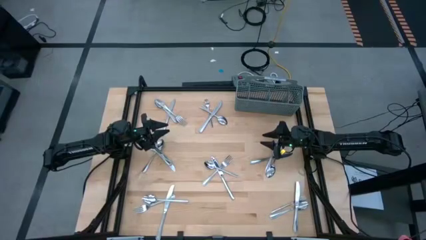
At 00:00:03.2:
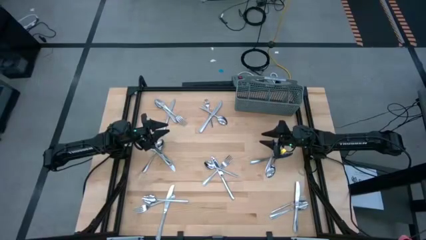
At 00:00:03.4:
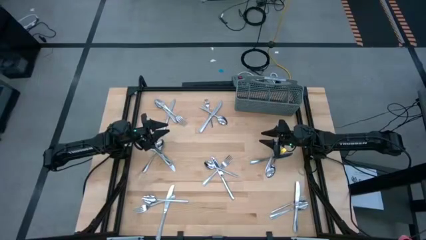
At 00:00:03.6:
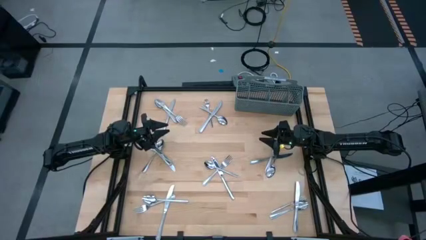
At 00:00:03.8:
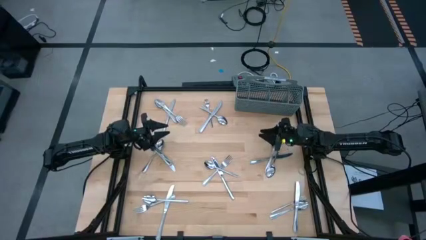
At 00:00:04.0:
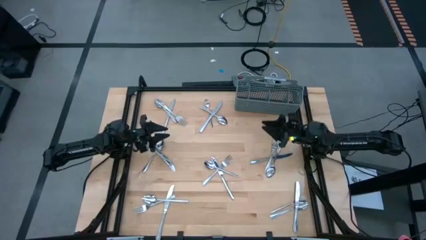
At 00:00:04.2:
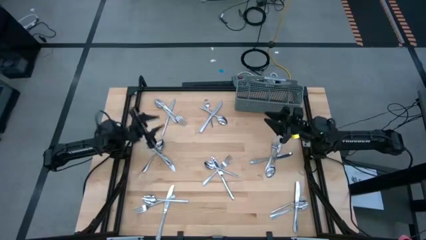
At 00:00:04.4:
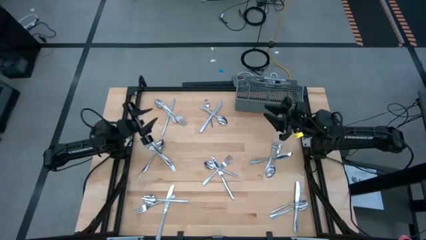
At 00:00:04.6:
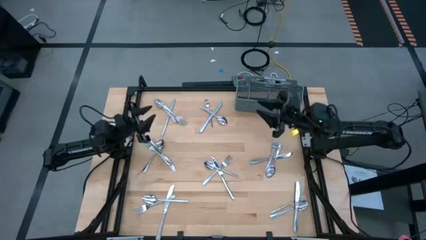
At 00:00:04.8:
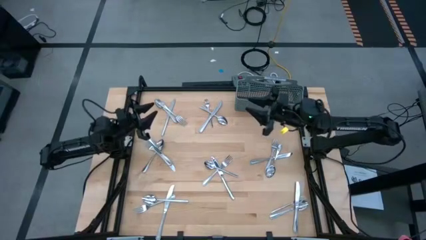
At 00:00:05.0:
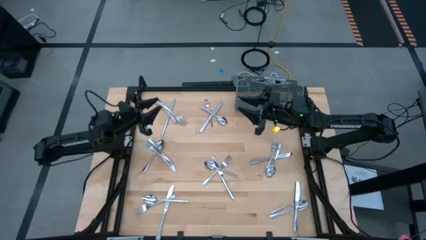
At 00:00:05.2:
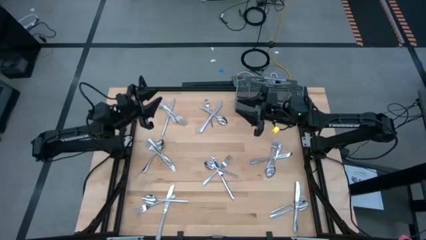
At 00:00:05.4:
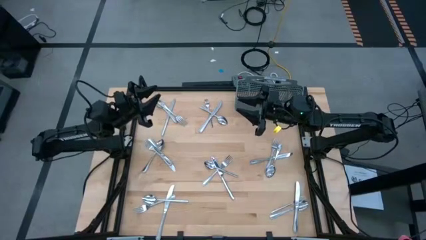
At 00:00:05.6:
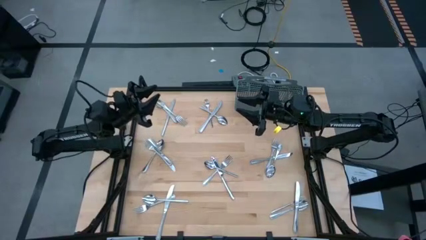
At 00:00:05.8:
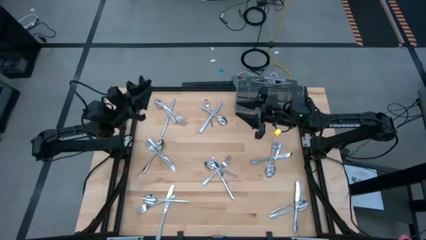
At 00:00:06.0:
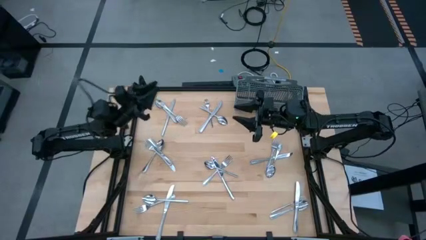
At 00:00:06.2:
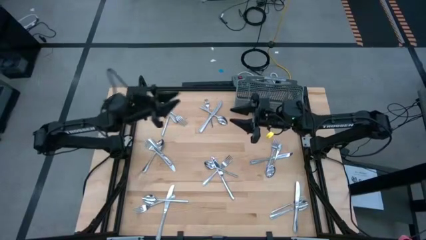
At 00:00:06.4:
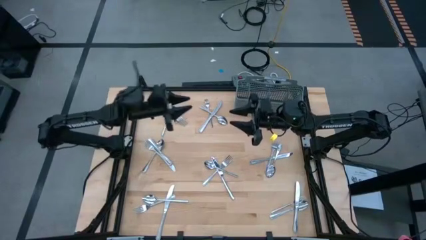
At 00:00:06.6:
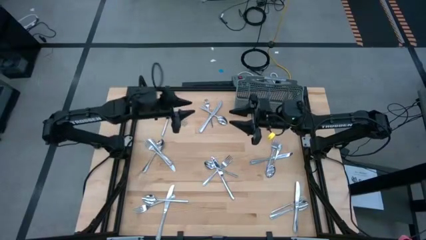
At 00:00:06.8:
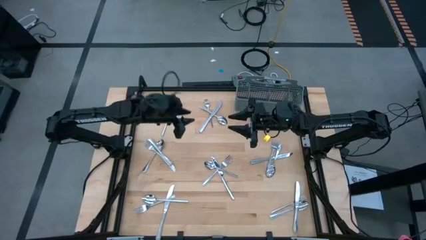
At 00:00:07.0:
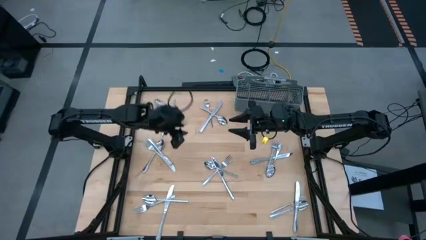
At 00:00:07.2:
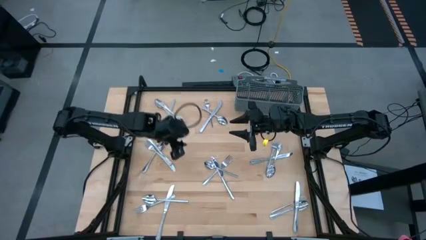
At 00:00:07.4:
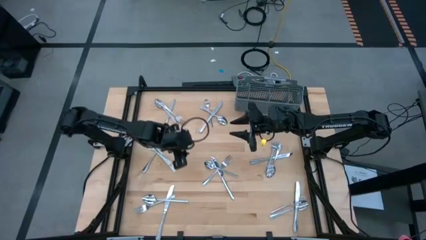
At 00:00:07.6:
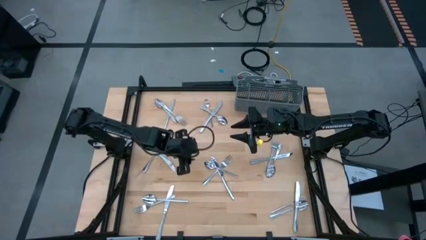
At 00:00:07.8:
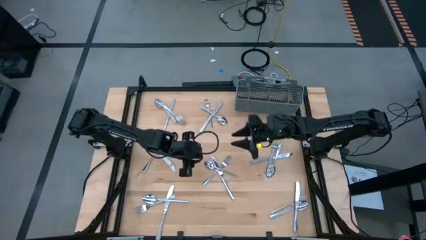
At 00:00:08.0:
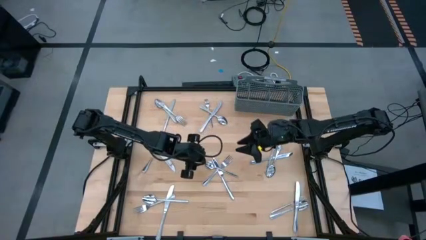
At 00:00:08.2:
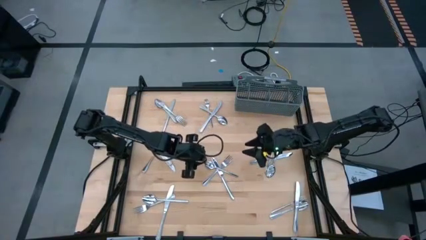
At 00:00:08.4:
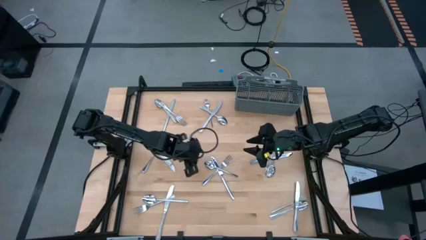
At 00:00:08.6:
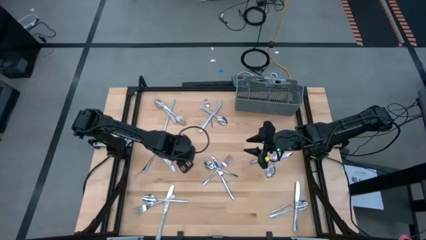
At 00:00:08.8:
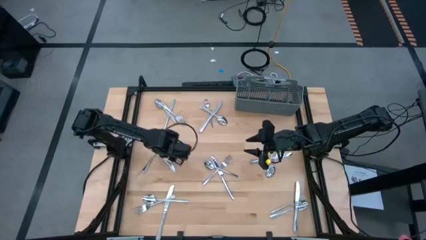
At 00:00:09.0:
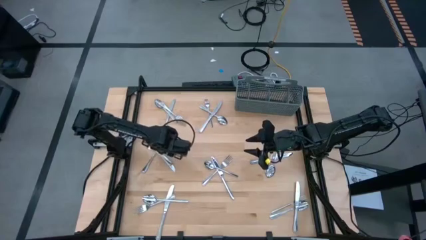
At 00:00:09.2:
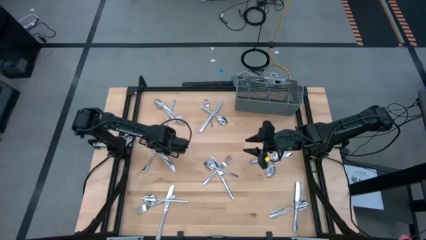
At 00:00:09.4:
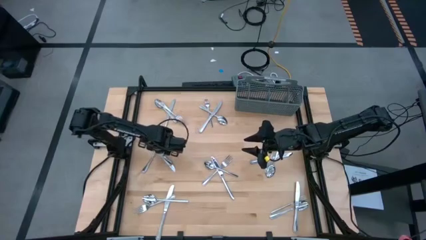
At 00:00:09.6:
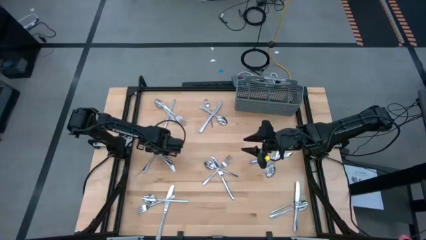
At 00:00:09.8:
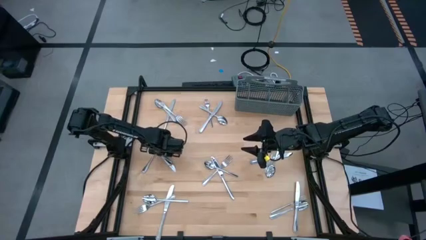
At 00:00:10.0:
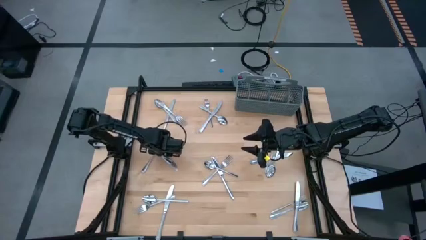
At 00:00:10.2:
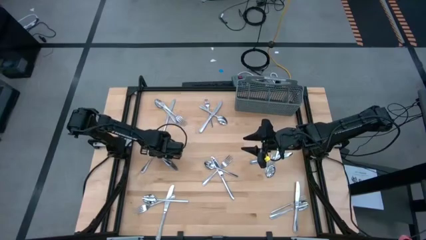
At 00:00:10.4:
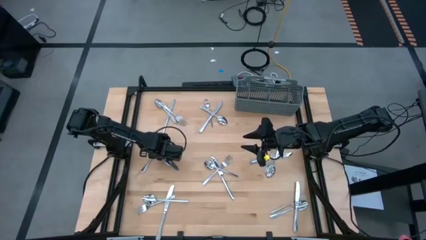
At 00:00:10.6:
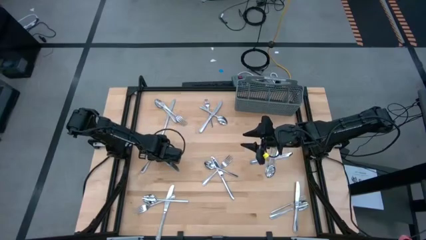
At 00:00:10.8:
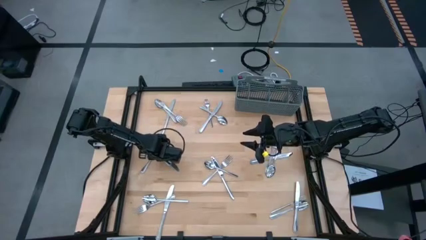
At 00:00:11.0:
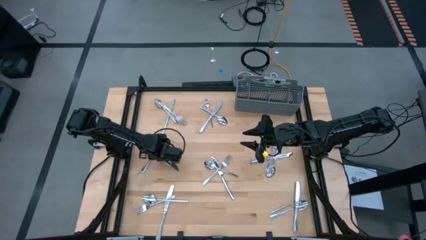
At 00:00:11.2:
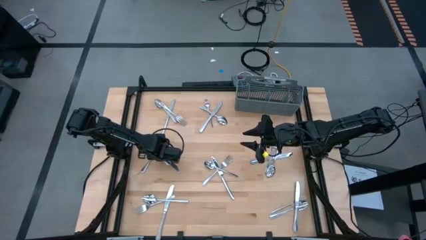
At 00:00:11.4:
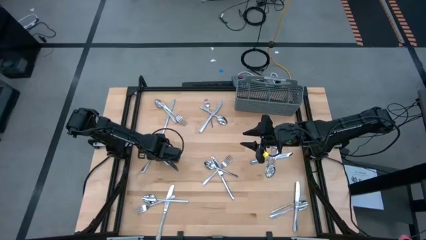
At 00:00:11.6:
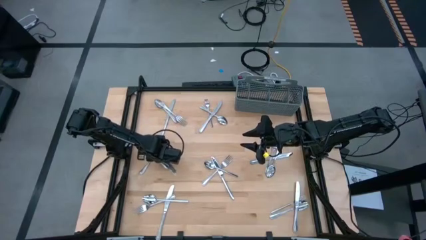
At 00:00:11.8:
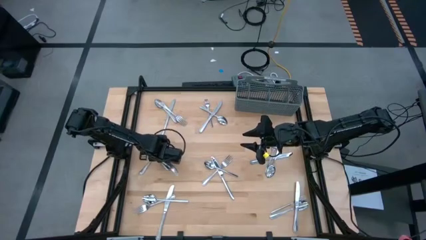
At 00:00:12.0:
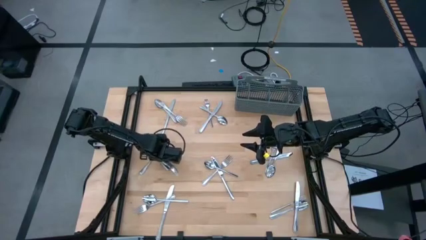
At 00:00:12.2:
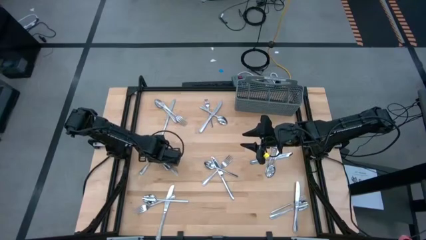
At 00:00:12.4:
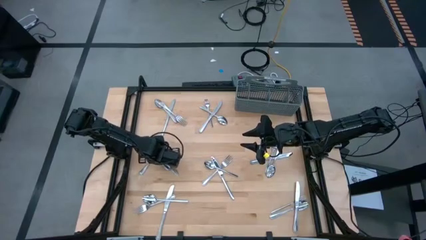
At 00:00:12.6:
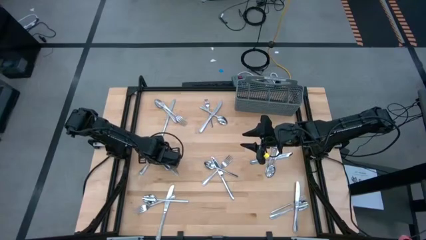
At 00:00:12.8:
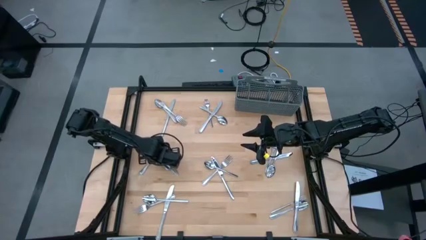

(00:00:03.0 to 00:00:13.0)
Task: Sort silverware
Put the silver knife into the silverware basket
